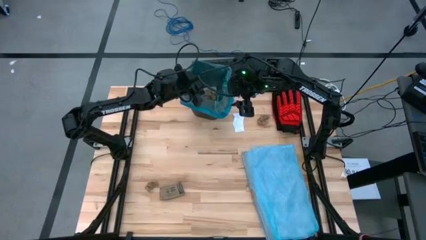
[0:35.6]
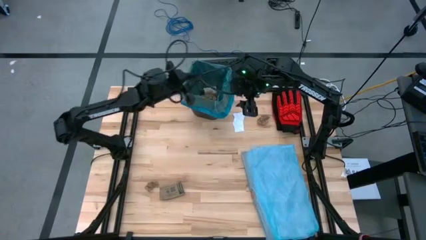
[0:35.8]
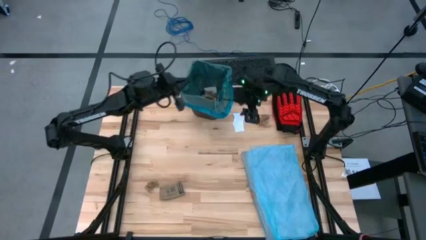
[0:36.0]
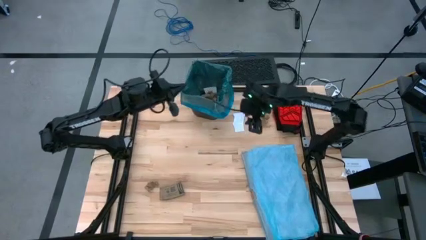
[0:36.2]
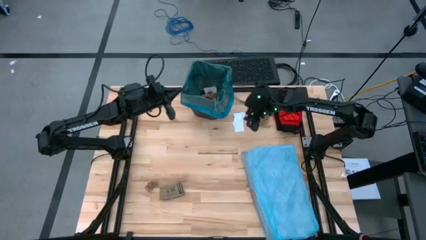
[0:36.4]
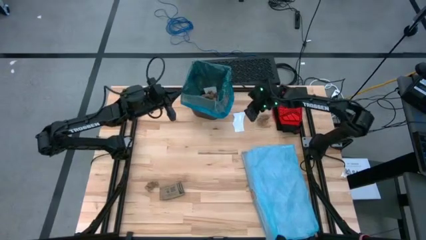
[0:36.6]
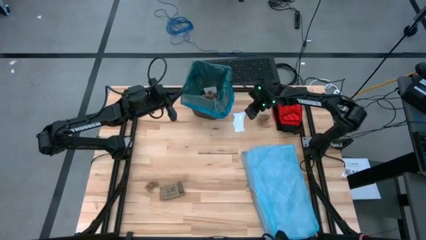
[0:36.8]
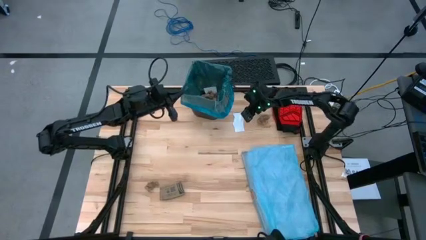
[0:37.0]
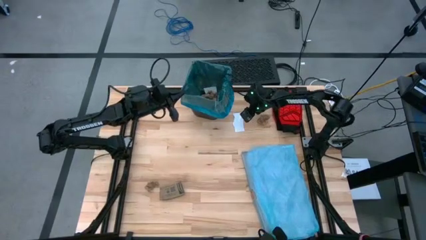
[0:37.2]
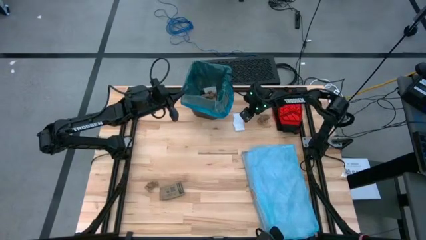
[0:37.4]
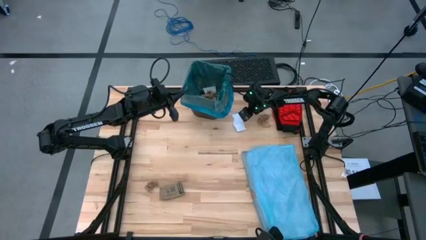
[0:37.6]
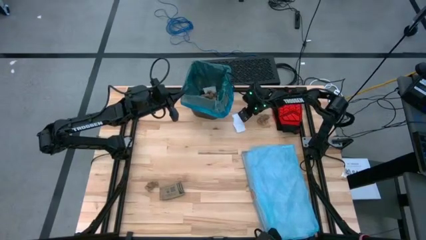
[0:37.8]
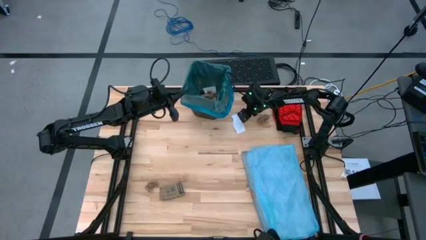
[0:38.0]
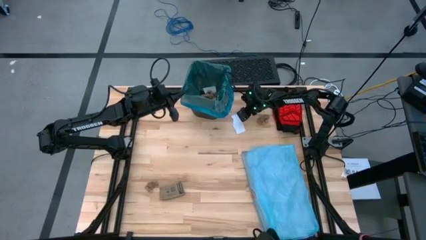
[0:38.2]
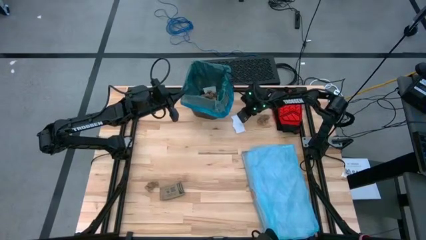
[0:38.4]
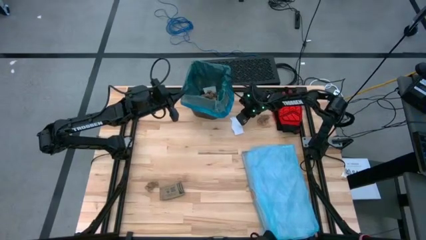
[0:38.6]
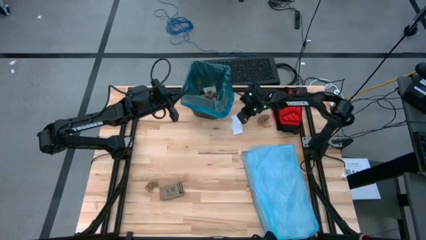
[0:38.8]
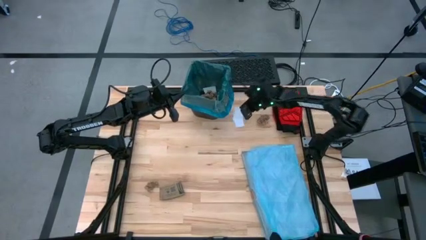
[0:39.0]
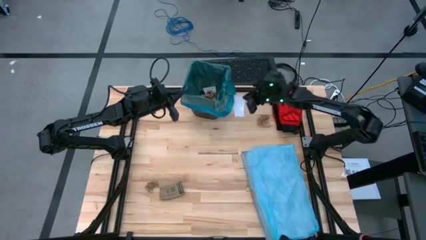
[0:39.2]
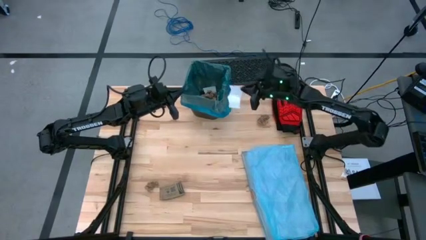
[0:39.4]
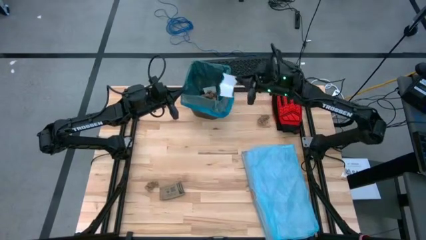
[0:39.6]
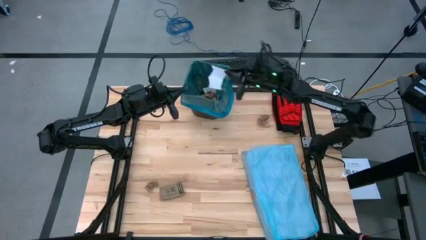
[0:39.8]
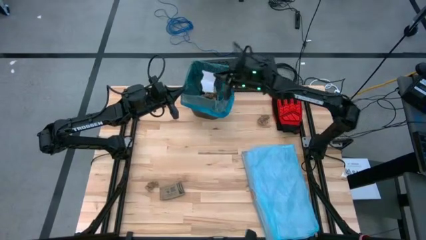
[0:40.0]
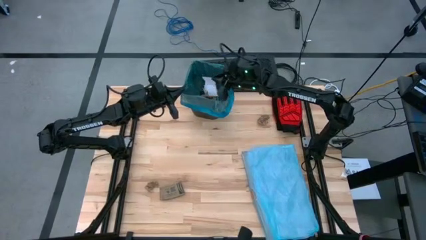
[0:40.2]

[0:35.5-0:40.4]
Task: place trash/remove bag and relplace
Put the white paper into the trash bin

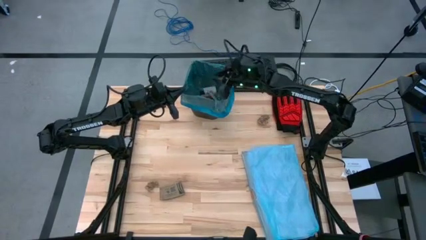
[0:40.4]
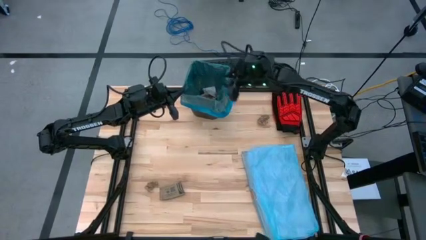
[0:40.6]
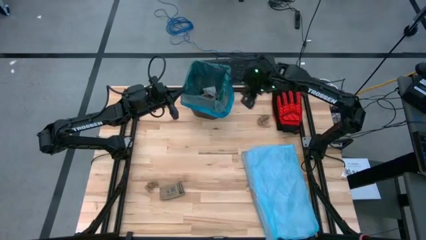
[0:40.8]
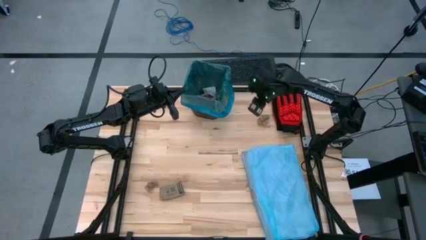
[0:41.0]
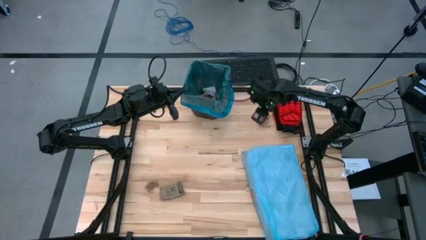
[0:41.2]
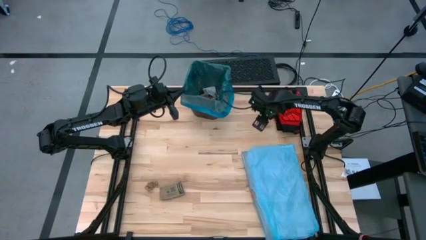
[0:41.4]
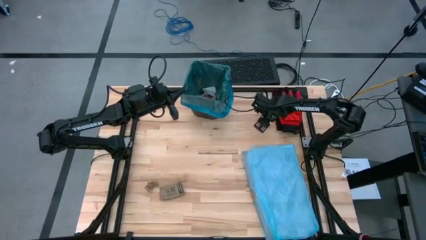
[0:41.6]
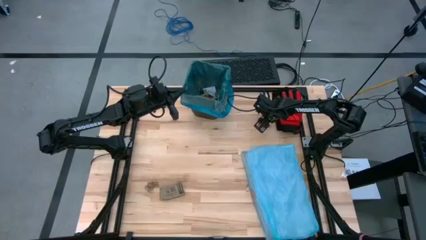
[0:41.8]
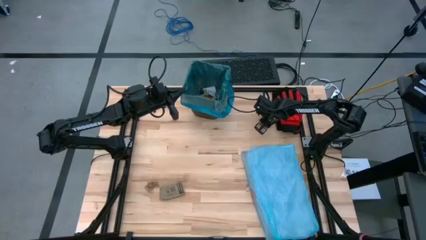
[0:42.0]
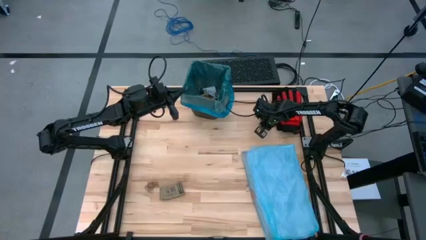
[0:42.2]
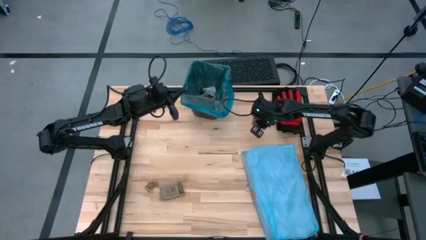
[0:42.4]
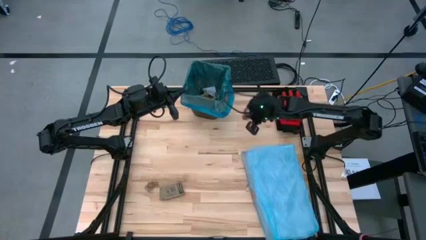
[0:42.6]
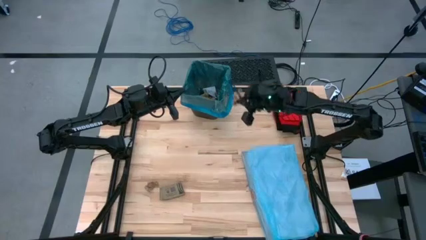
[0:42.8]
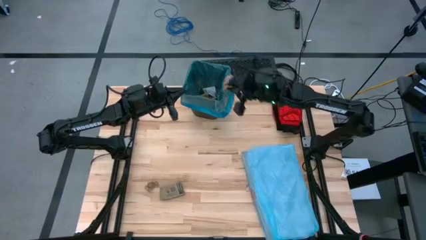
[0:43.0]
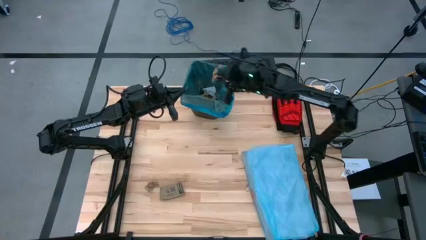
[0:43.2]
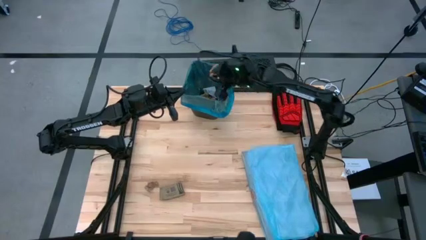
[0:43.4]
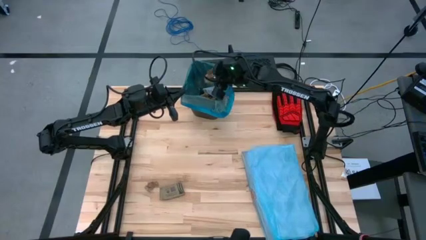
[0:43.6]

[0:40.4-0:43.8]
Put the brown napkin into the trash bin

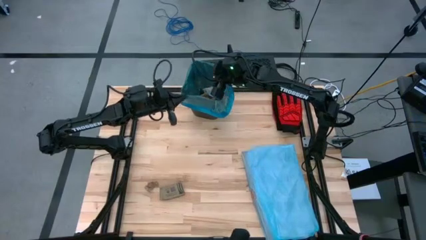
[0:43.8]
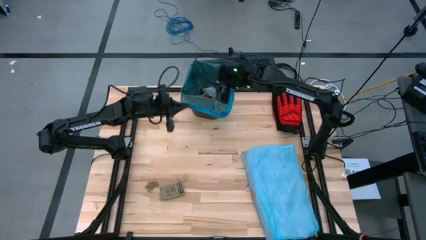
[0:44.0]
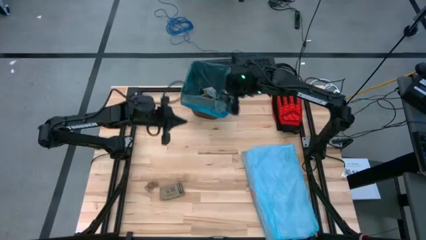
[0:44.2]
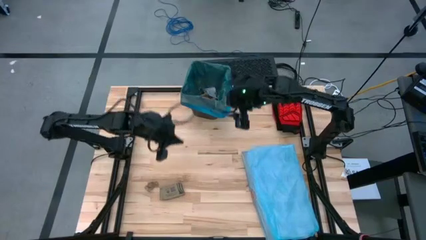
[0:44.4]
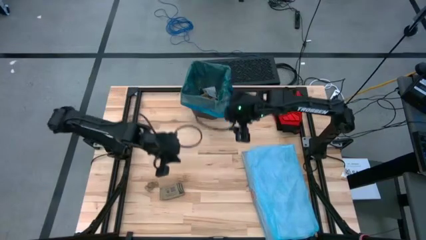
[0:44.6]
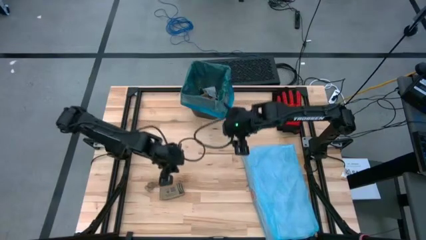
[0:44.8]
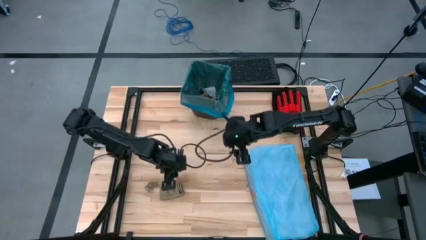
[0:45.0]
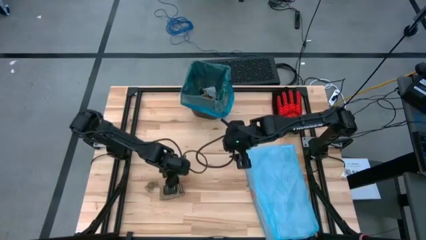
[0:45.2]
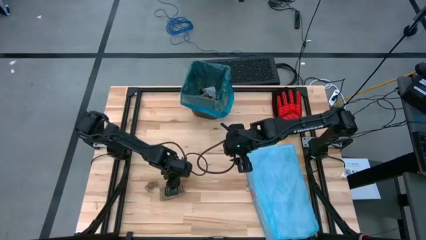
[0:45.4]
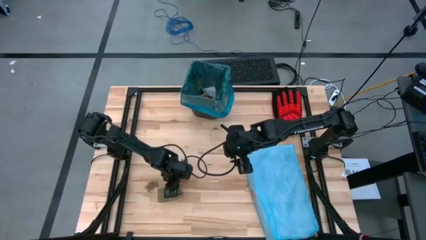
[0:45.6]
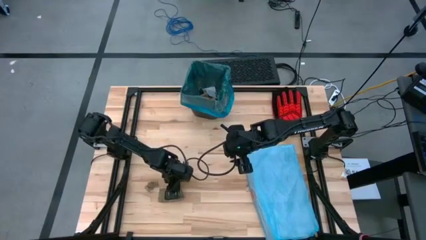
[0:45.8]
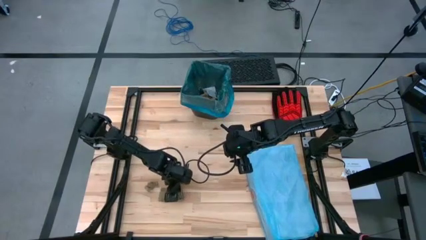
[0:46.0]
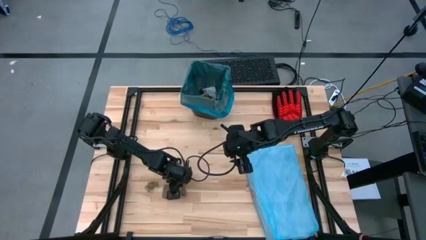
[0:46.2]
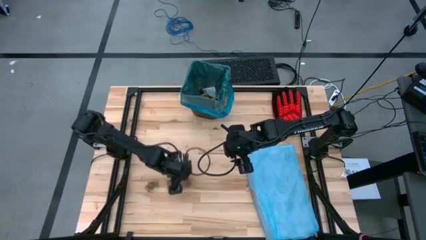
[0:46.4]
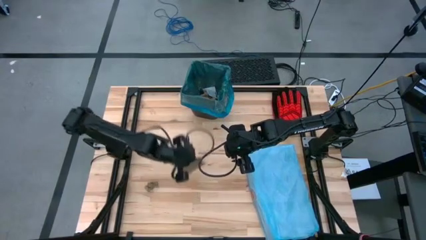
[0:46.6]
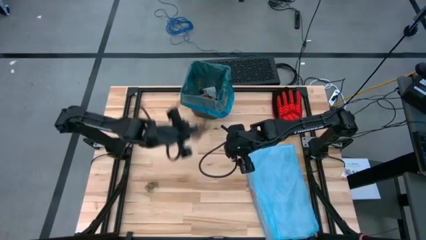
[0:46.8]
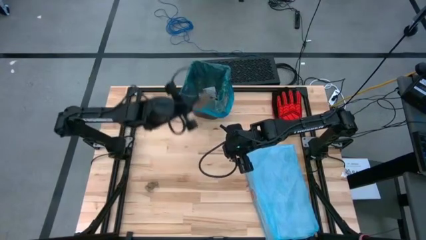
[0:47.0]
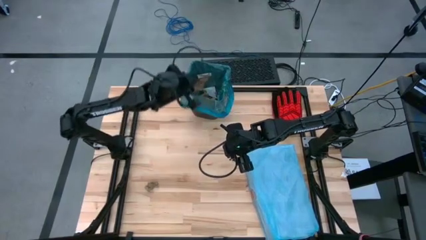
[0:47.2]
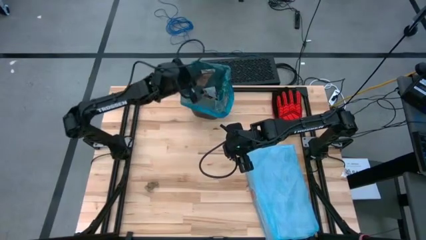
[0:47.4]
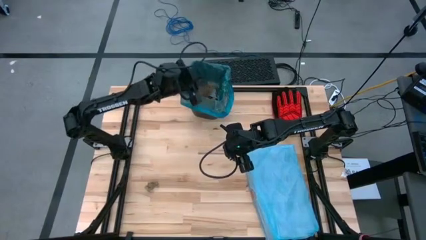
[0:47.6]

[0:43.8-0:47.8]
Put the brown paper into the trash bin

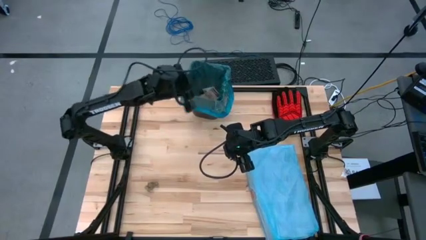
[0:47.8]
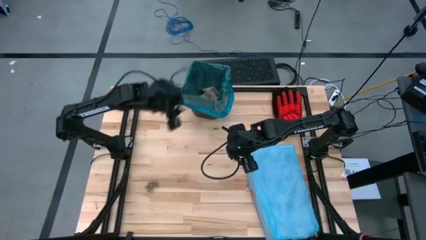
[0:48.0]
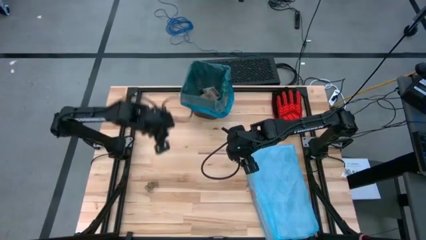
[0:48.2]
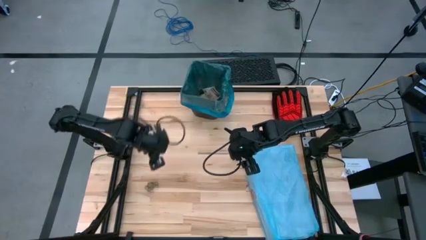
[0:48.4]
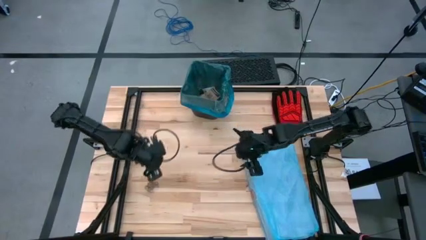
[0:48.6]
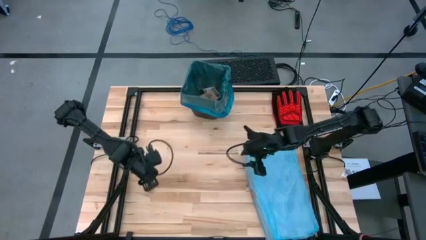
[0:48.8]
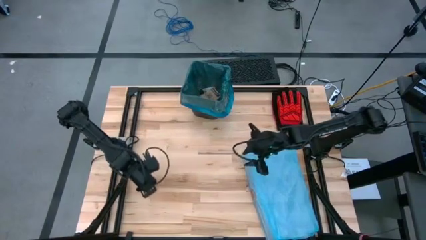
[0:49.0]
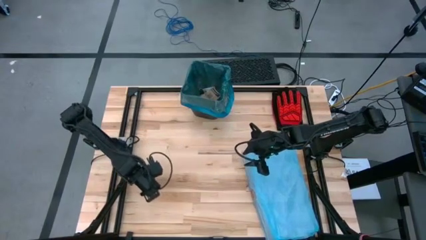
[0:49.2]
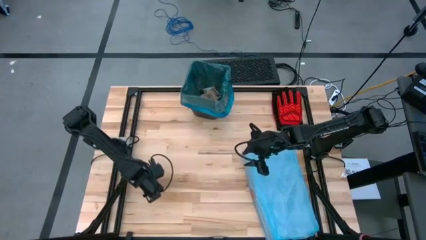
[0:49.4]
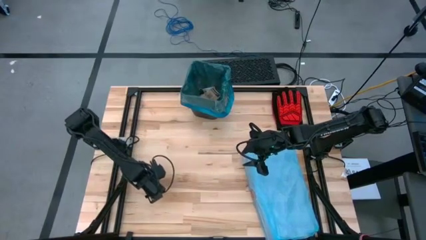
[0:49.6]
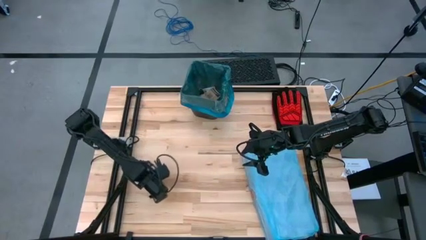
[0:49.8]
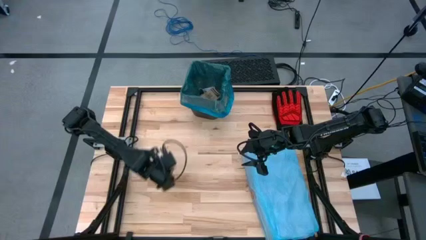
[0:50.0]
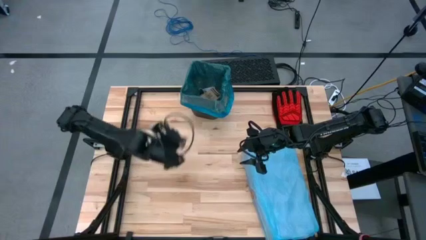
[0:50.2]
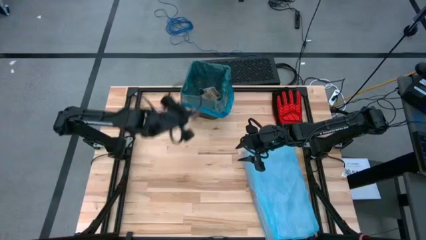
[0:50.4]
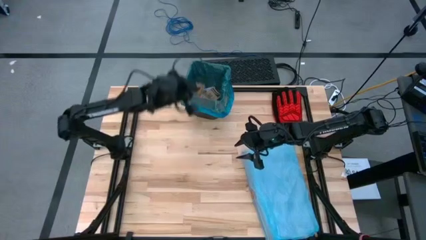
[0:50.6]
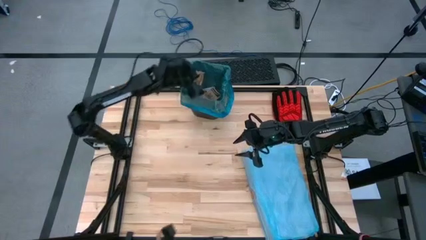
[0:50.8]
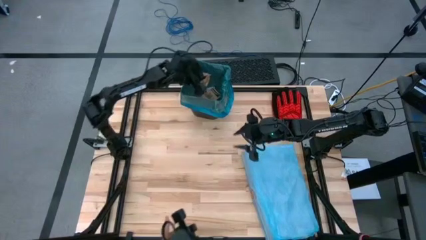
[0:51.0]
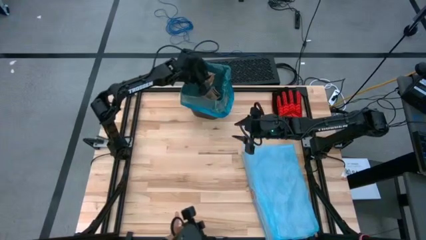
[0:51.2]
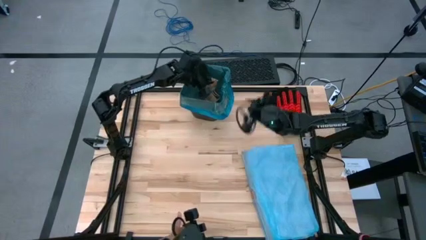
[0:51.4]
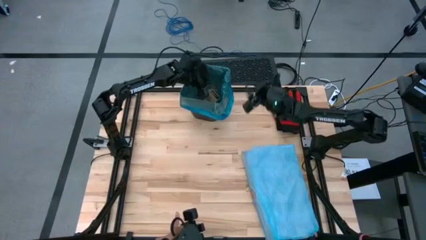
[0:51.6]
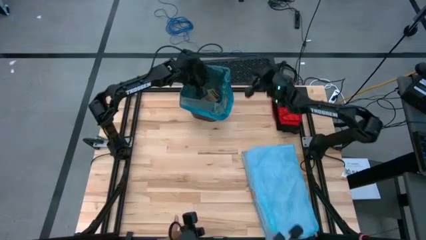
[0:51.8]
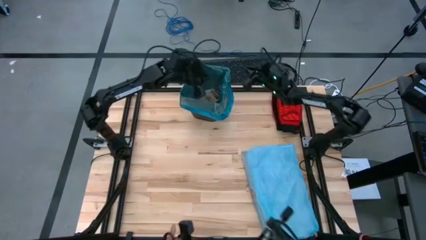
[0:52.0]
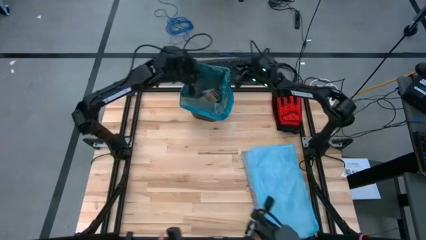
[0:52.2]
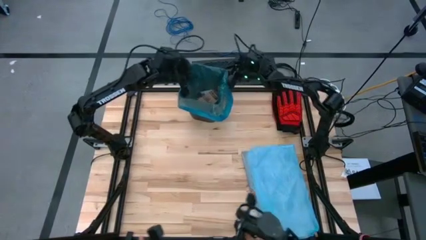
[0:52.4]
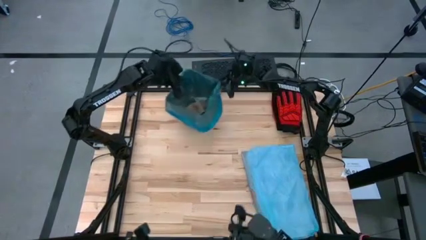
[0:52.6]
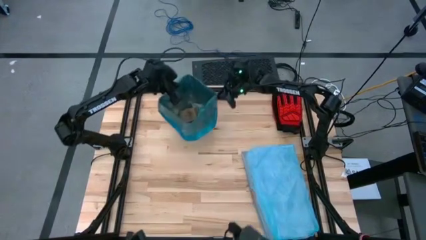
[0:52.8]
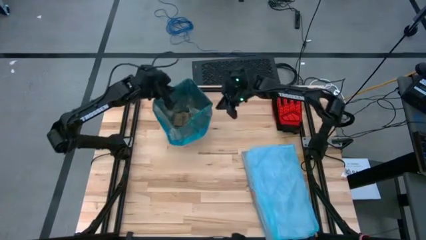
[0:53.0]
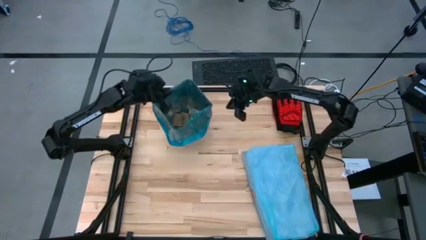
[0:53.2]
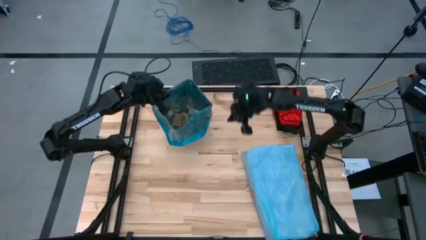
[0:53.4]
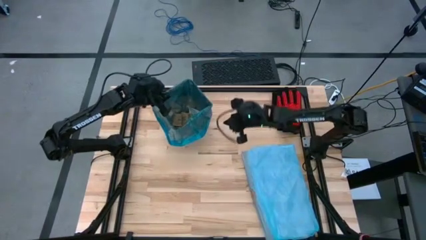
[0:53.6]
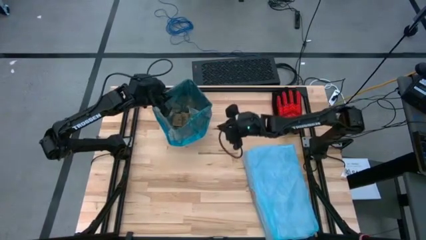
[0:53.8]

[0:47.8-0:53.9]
Put the brown napkin into the trash bin
